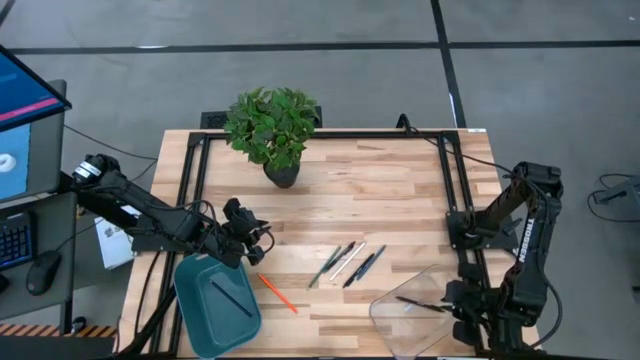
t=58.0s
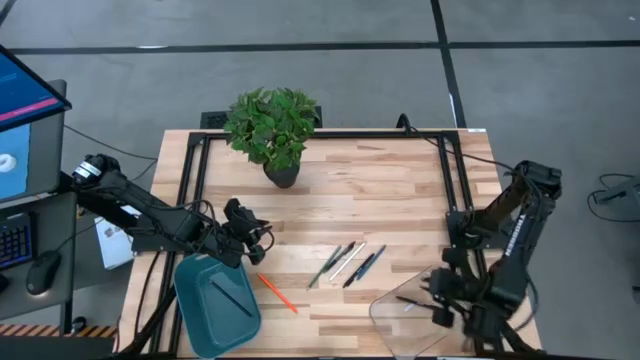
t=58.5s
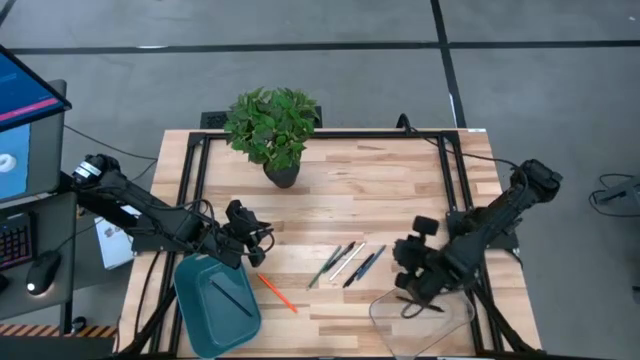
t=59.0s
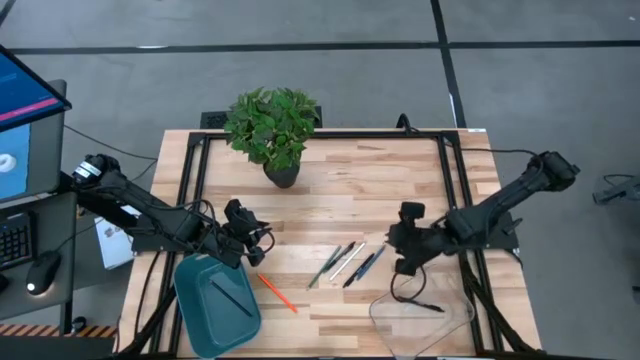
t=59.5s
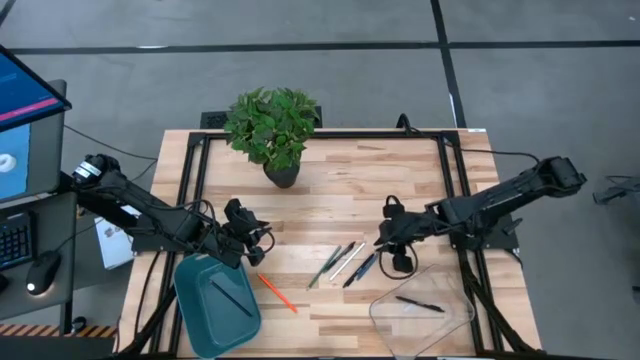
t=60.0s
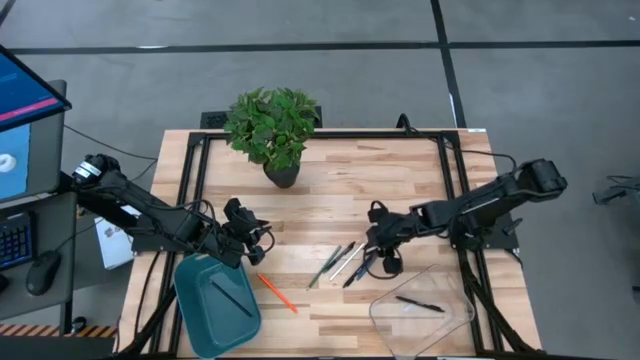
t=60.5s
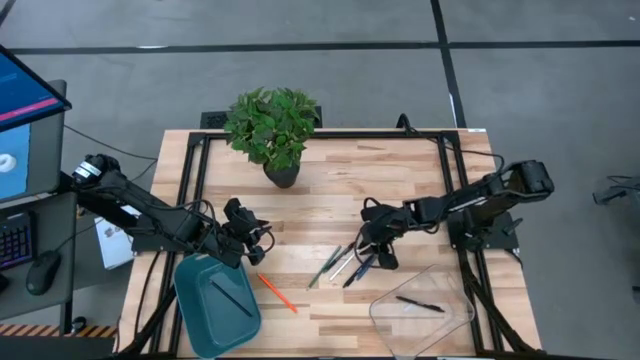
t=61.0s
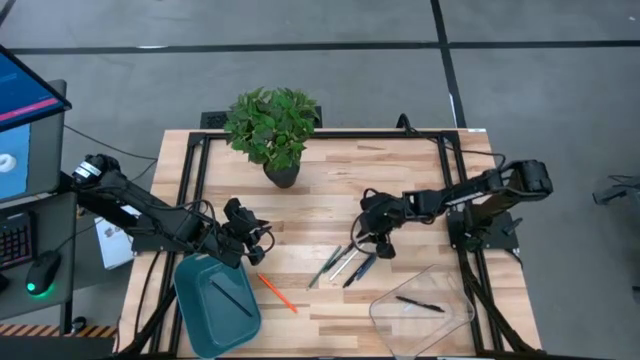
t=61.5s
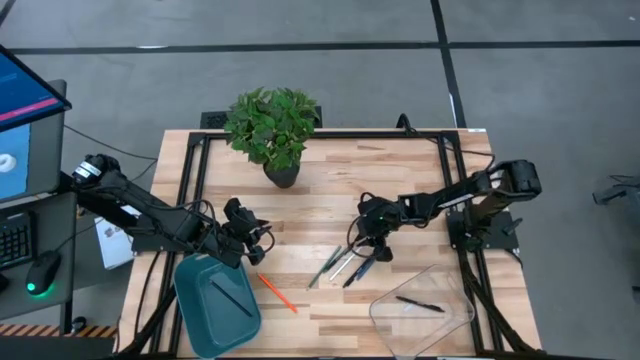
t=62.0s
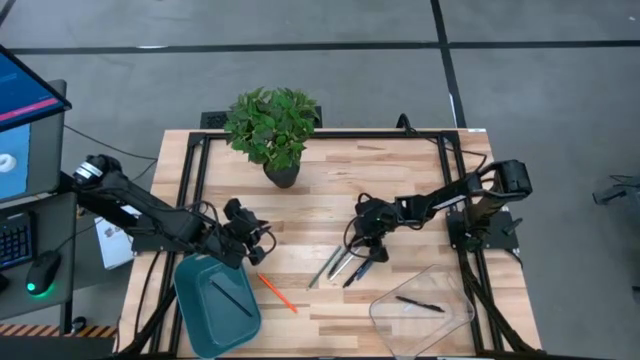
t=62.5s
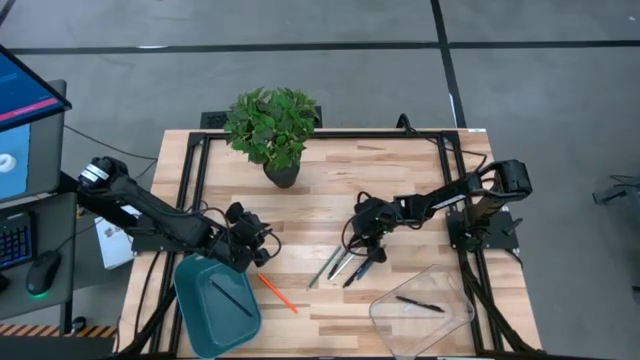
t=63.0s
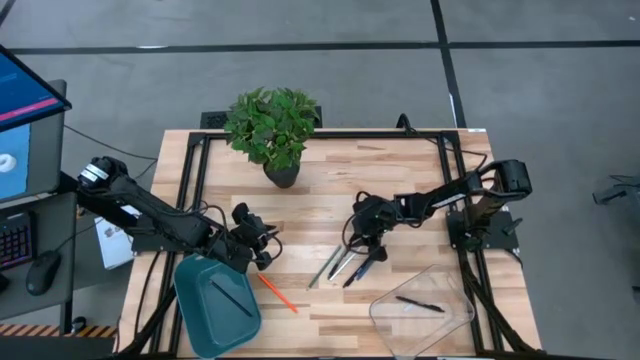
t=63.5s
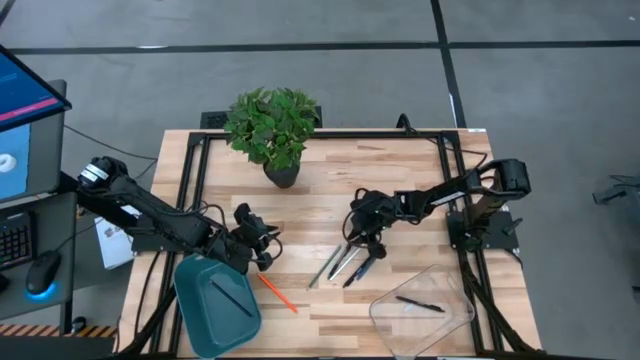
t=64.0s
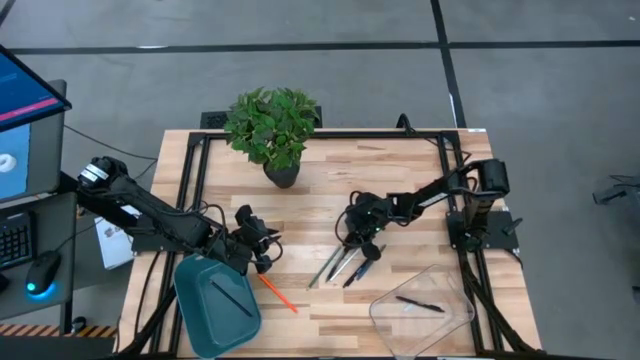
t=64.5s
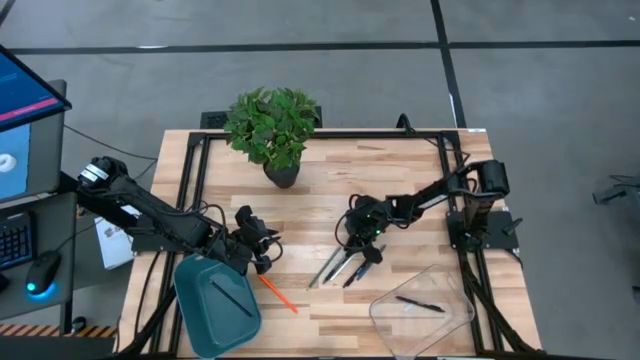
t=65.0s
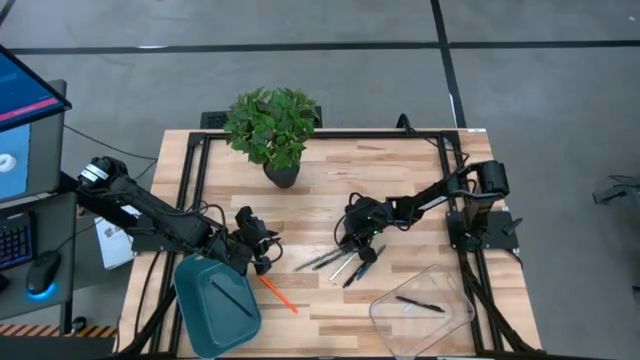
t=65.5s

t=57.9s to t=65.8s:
Task: Sort pens & pencils
Adjust the left black pen

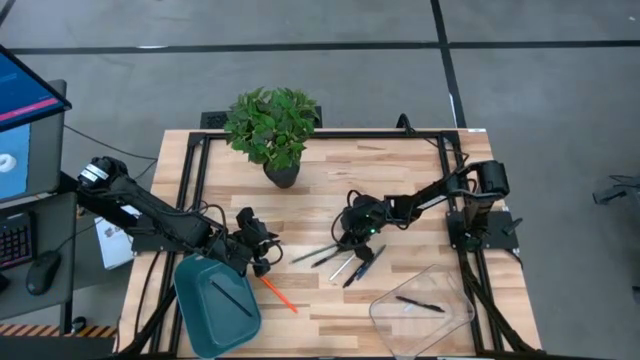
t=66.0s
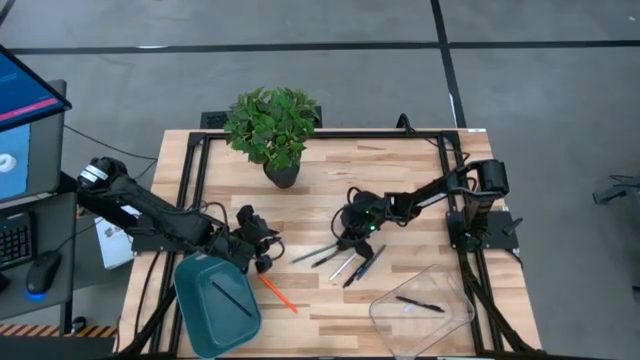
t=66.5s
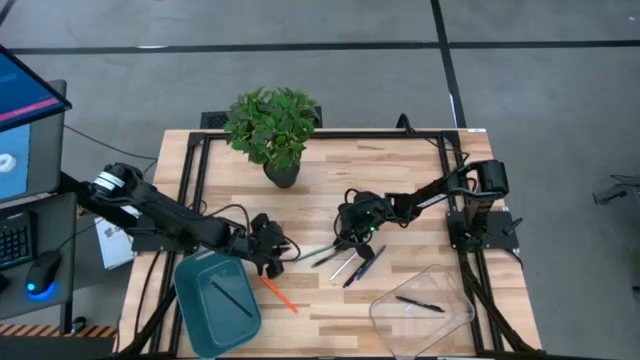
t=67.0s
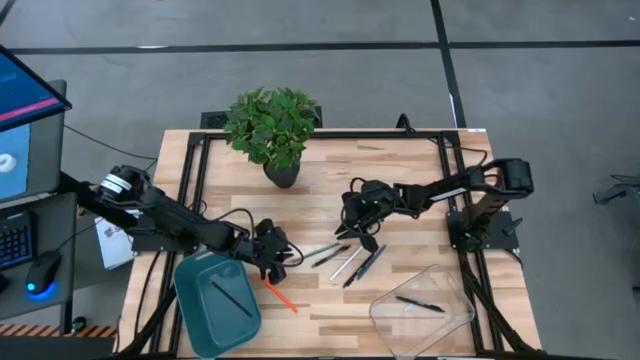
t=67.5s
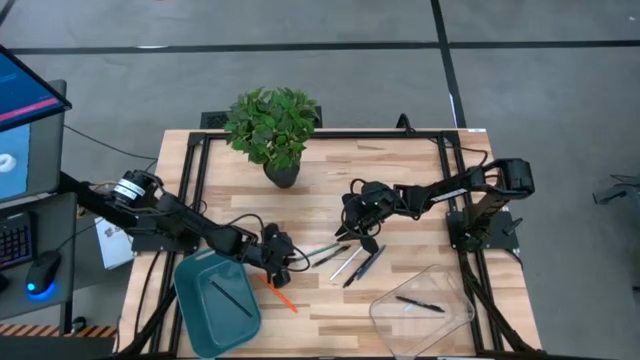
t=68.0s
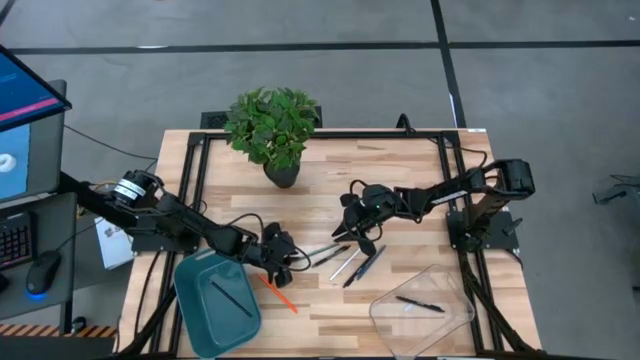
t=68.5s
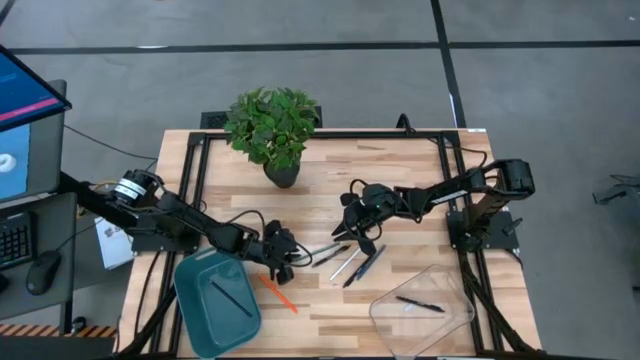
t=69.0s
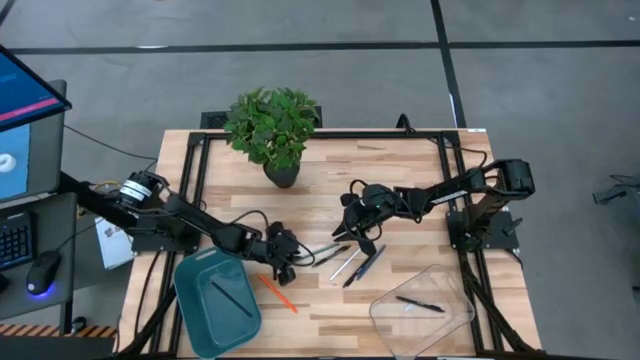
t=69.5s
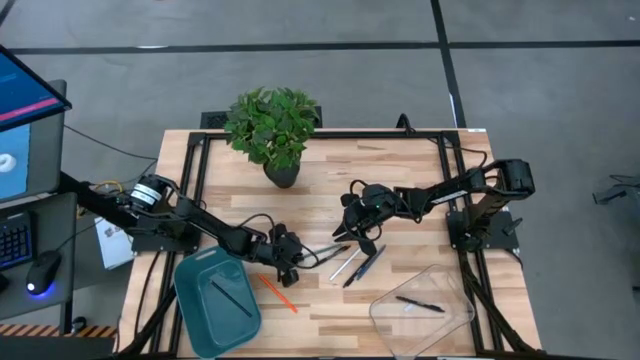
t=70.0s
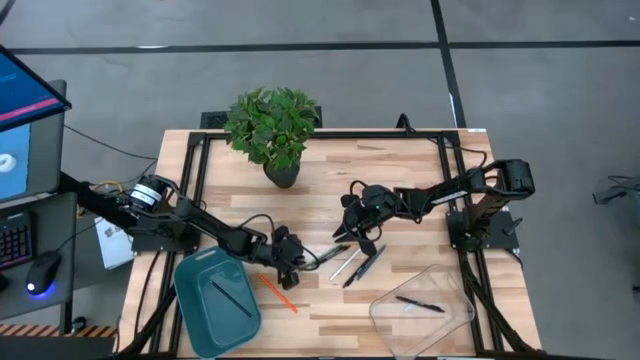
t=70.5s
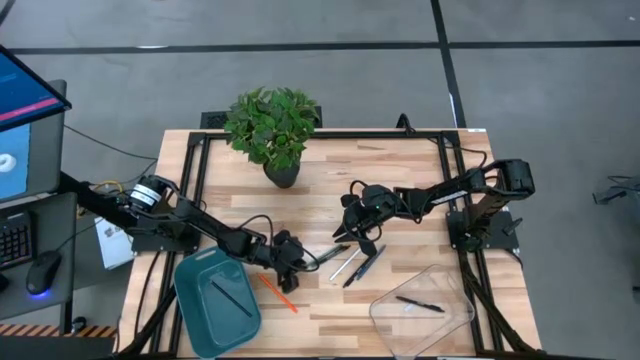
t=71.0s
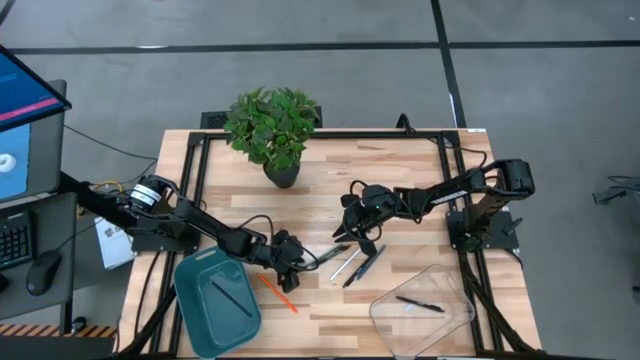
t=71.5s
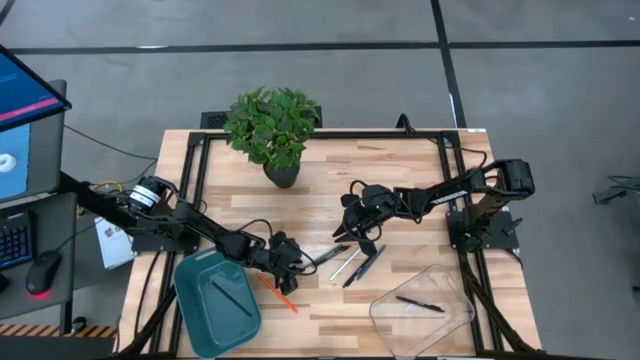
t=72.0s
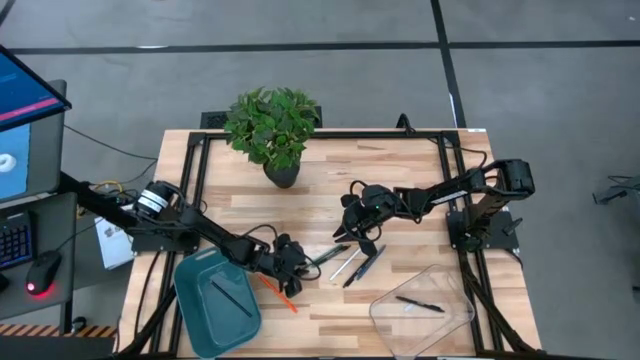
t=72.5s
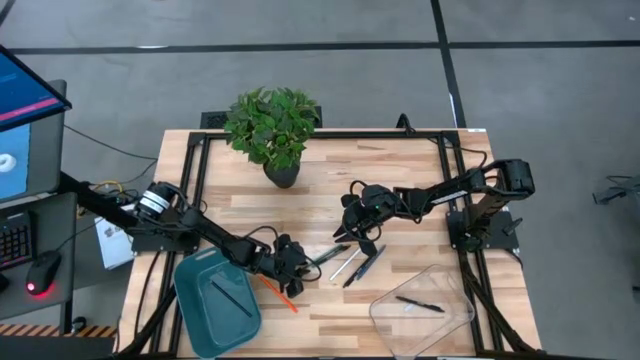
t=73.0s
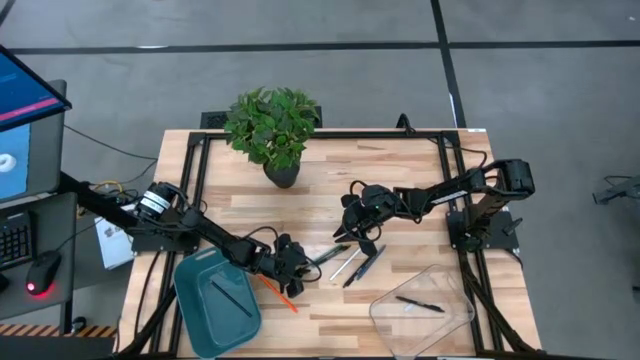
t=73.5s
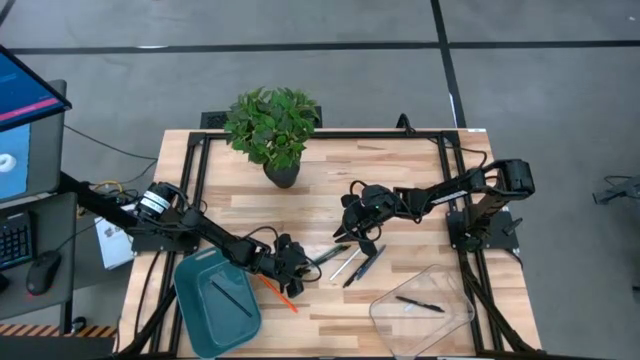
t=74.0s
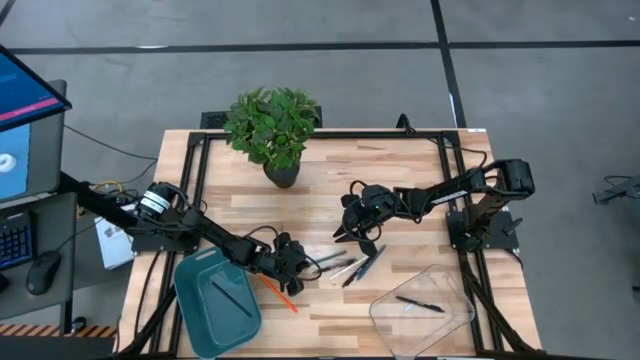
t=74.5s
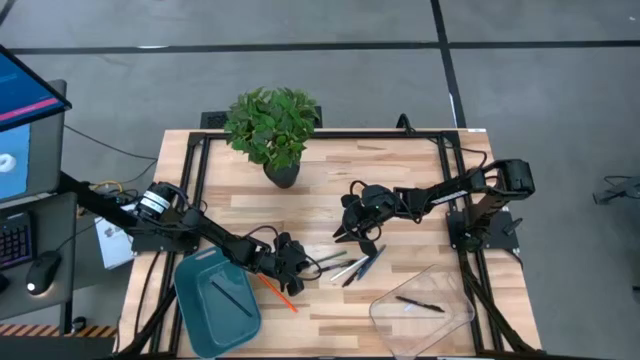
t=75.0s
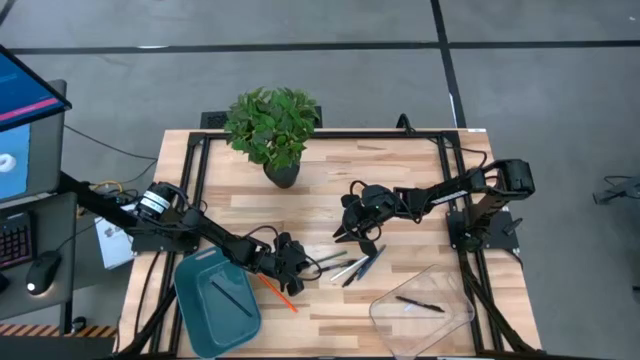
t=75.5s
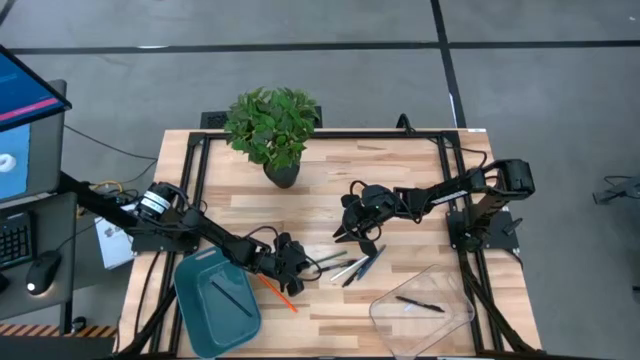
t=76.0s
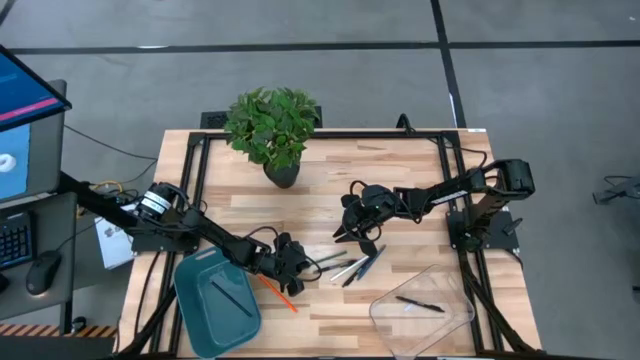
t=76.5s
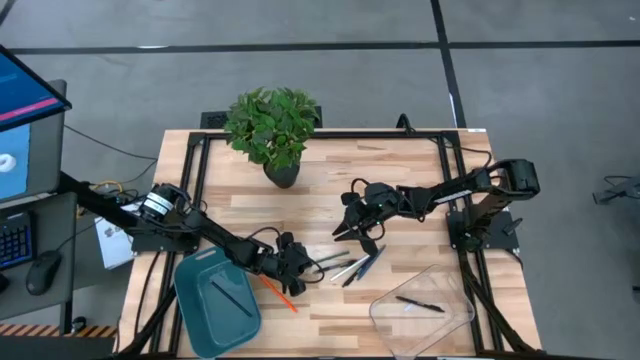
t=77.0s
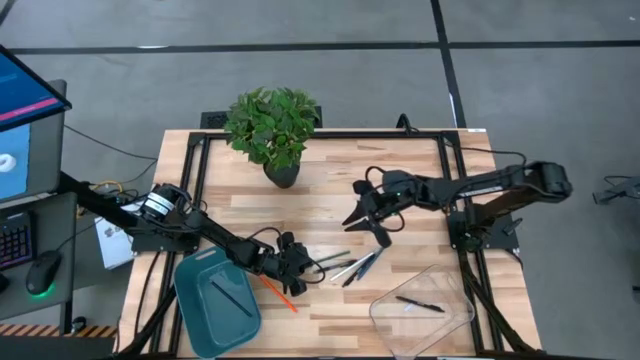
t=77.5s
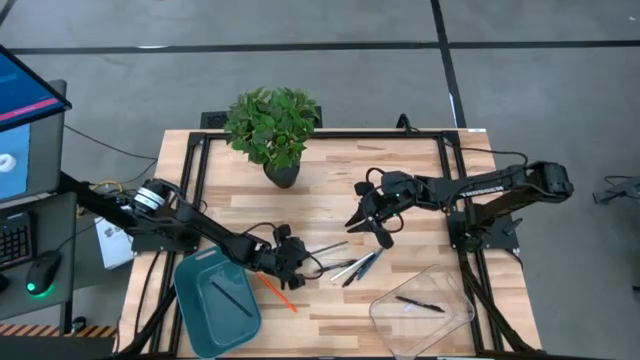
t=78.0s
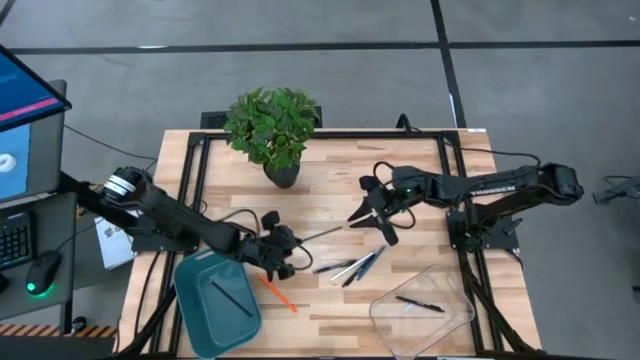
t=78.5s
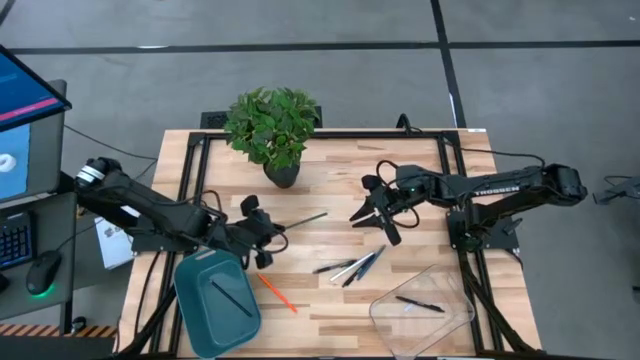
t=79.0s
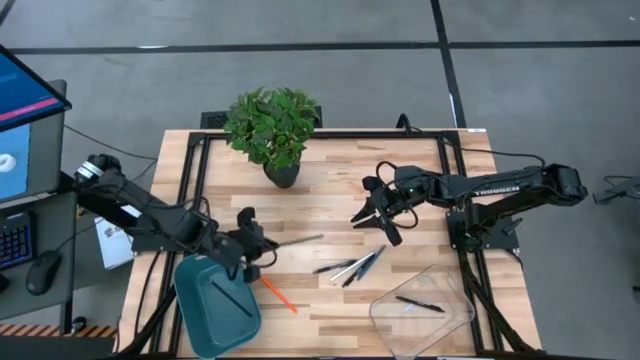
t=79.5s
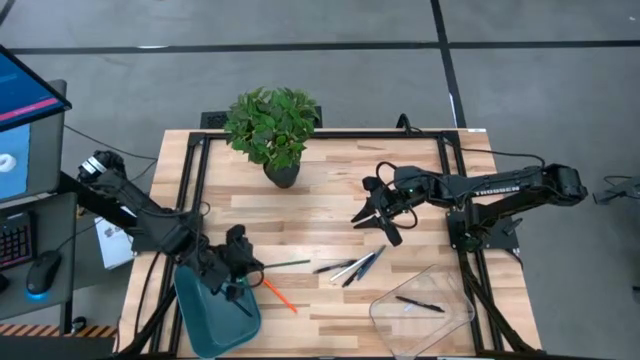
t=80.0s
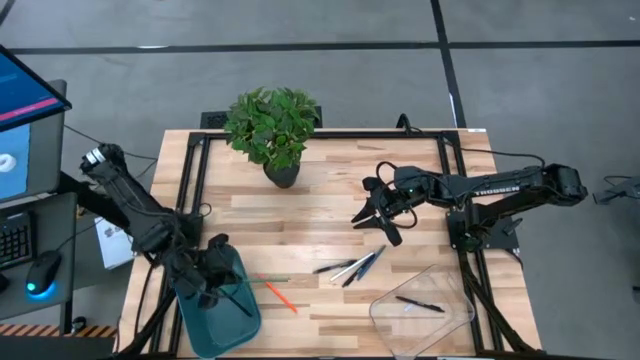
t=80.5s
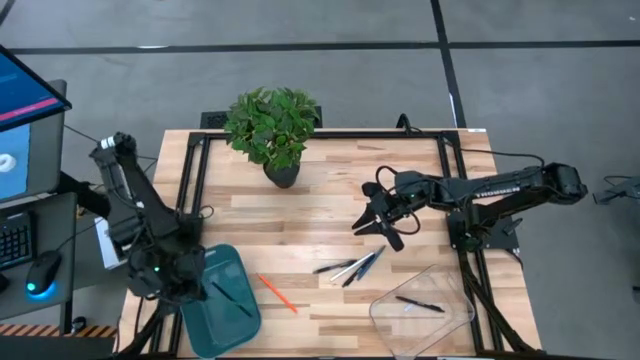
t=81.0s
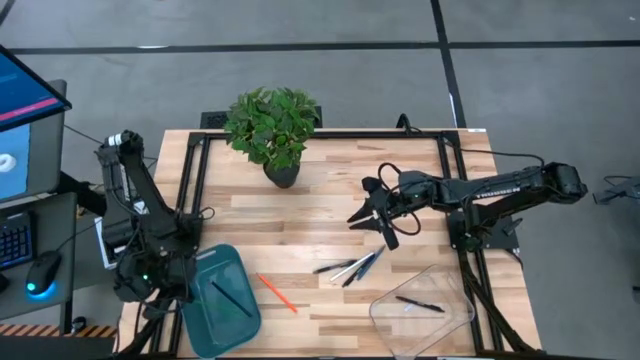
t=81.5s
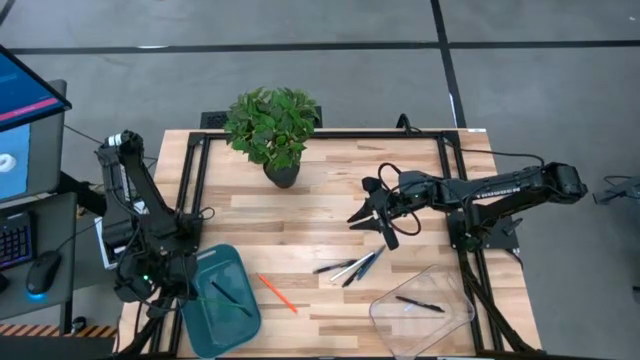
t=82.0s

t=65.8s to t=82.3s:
Put the green pencil into the blue bin
